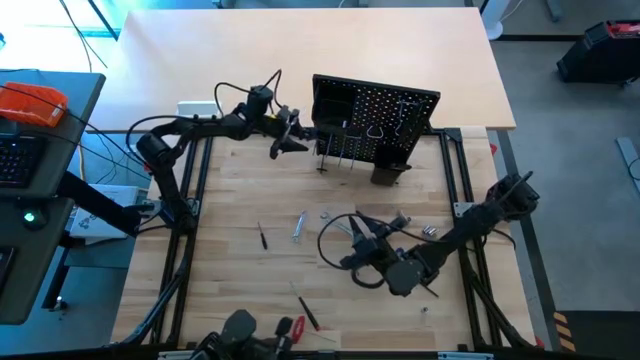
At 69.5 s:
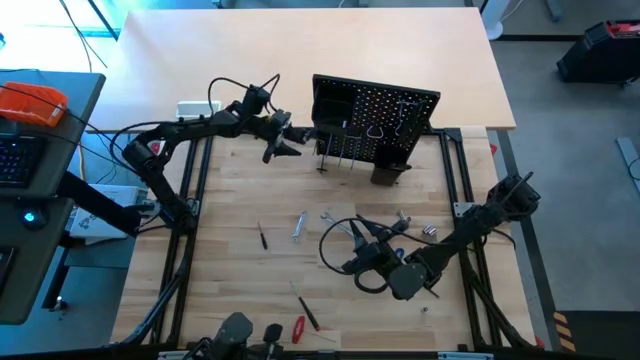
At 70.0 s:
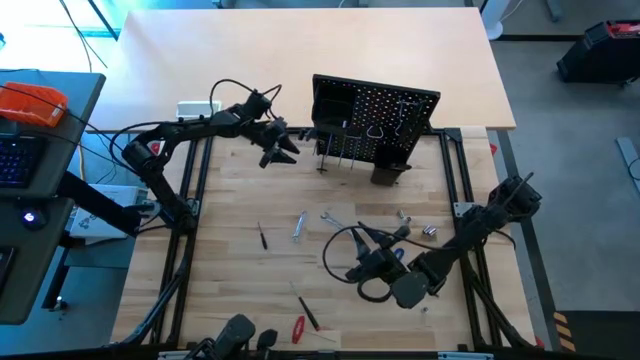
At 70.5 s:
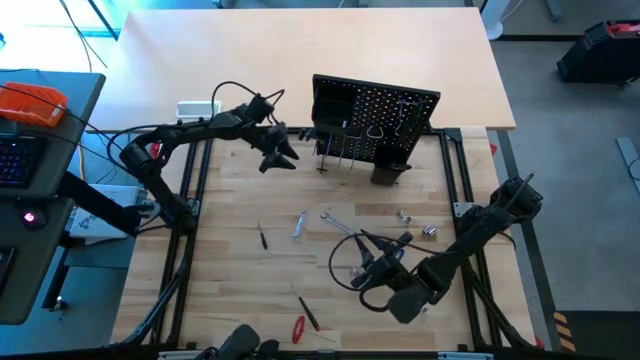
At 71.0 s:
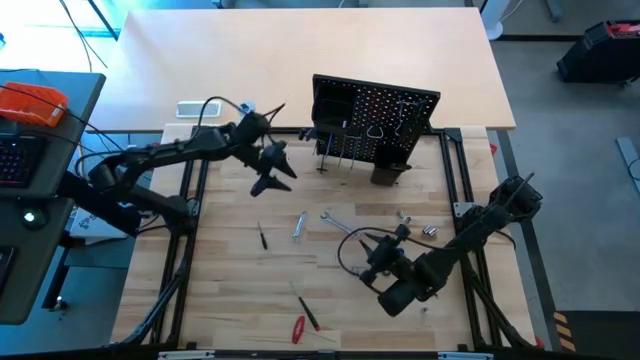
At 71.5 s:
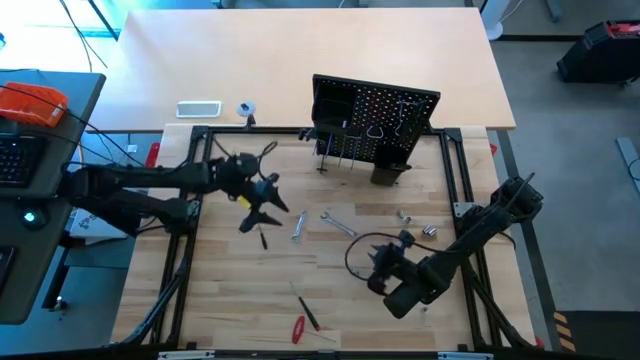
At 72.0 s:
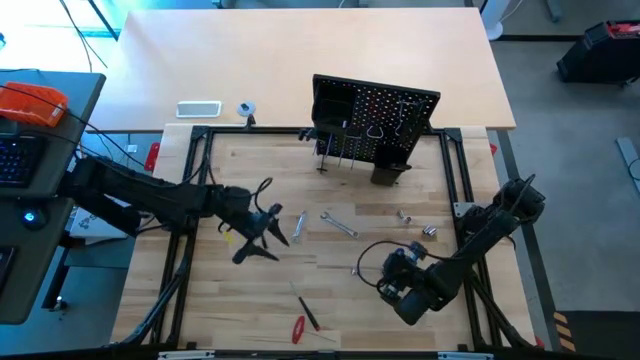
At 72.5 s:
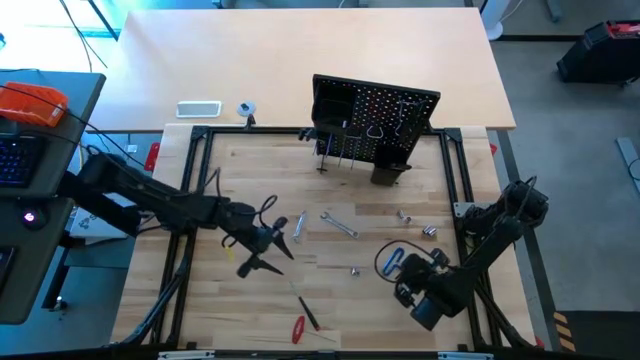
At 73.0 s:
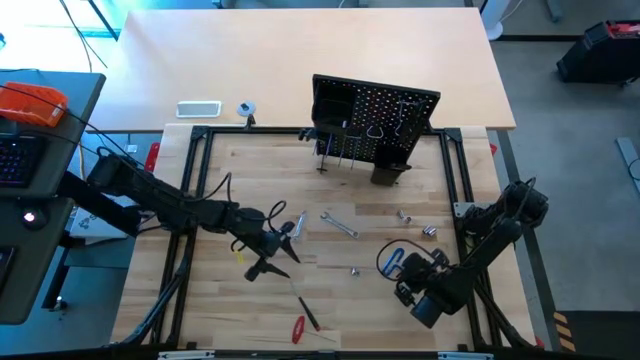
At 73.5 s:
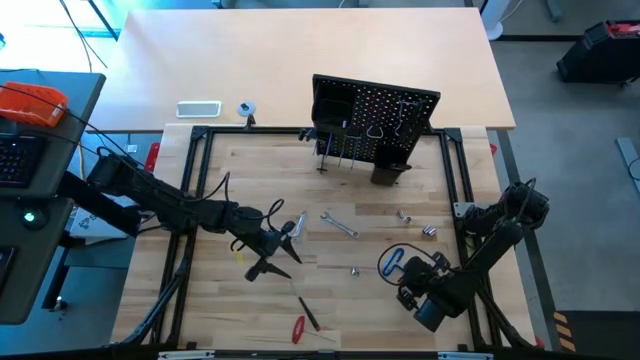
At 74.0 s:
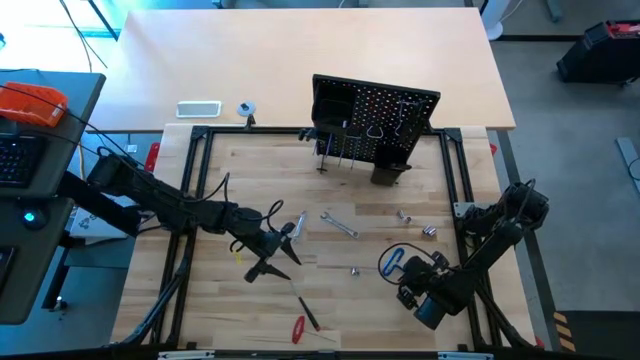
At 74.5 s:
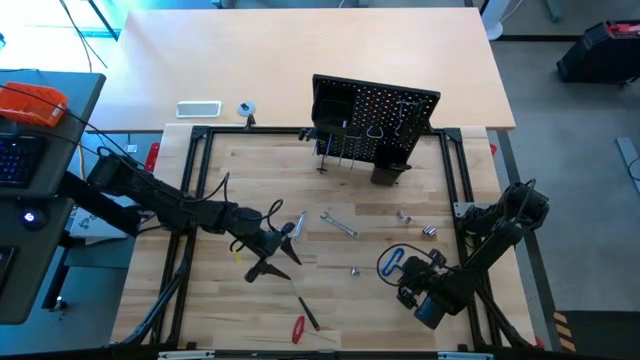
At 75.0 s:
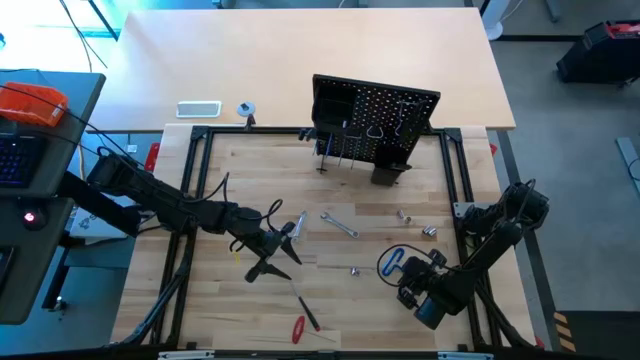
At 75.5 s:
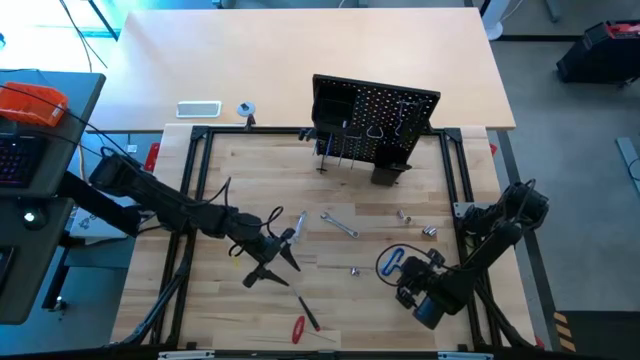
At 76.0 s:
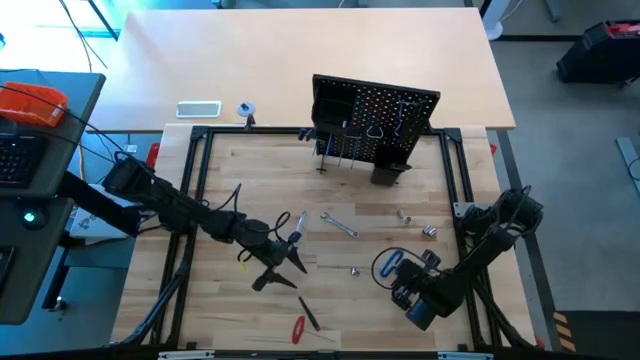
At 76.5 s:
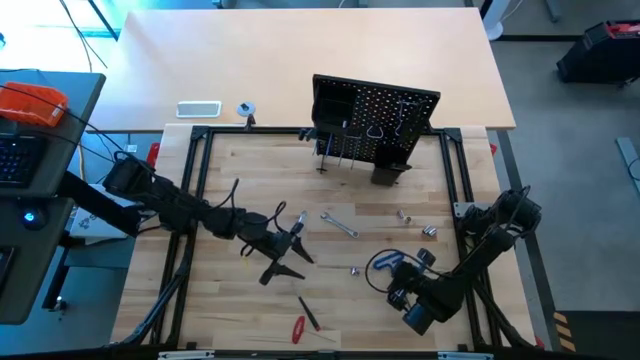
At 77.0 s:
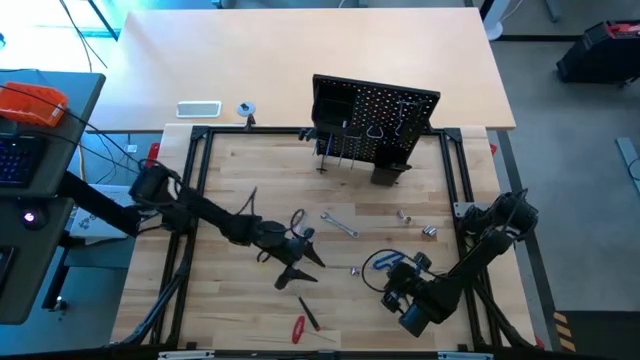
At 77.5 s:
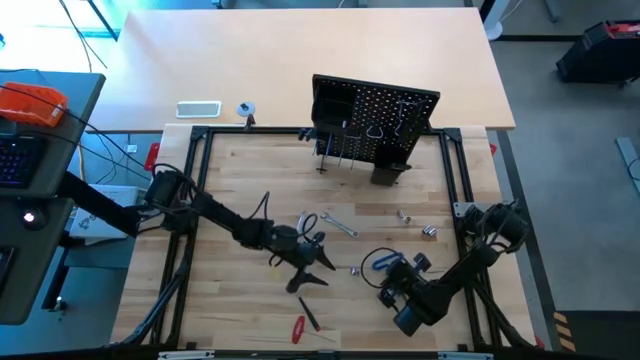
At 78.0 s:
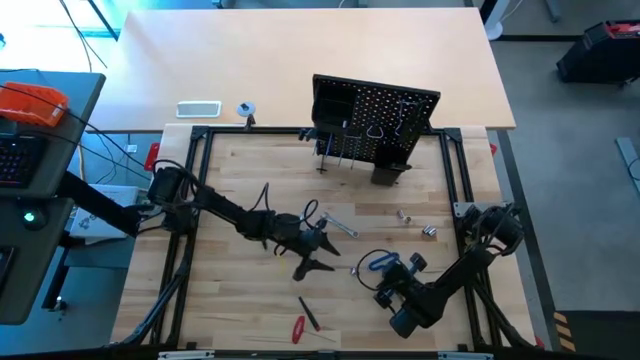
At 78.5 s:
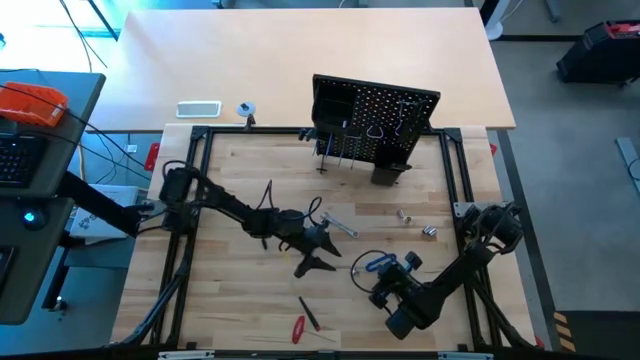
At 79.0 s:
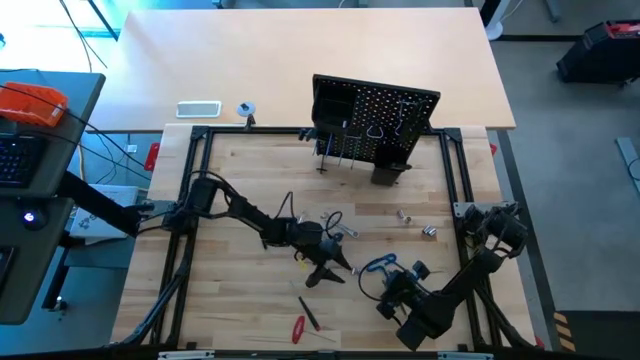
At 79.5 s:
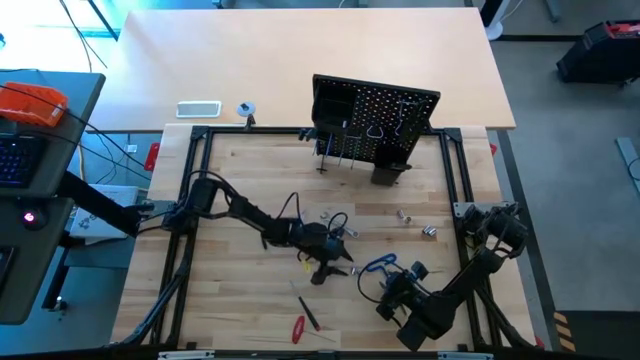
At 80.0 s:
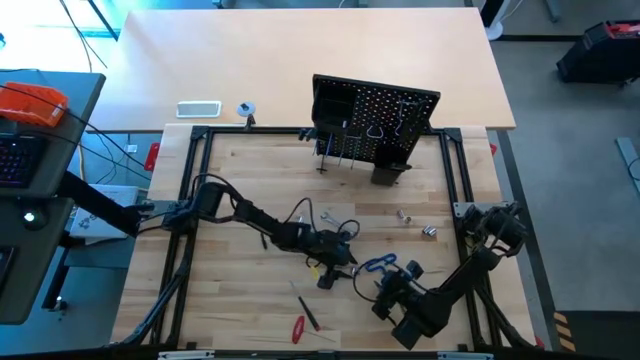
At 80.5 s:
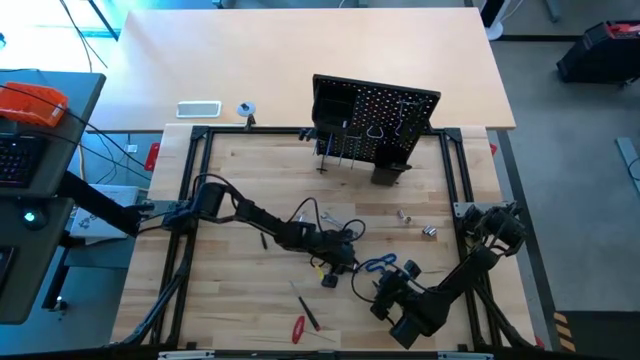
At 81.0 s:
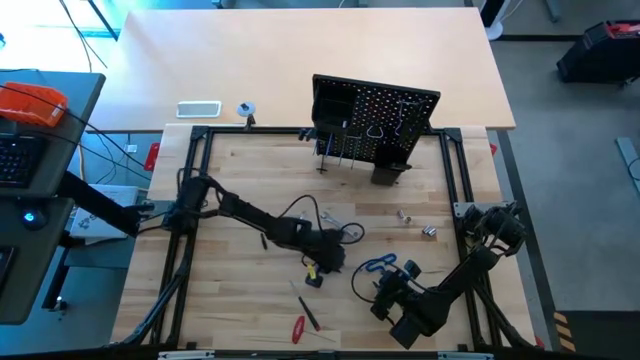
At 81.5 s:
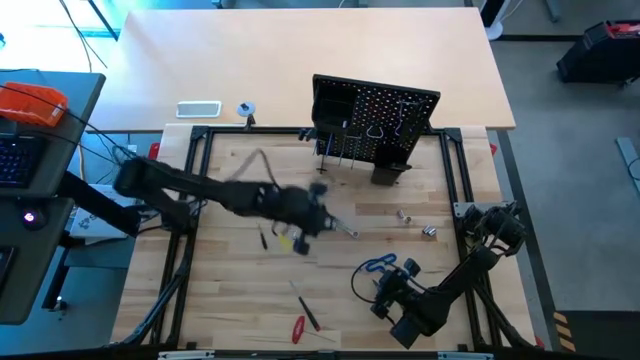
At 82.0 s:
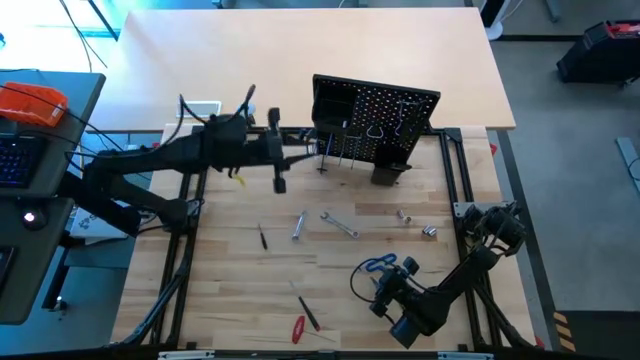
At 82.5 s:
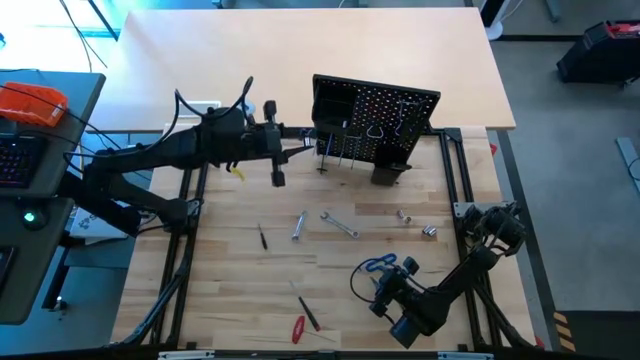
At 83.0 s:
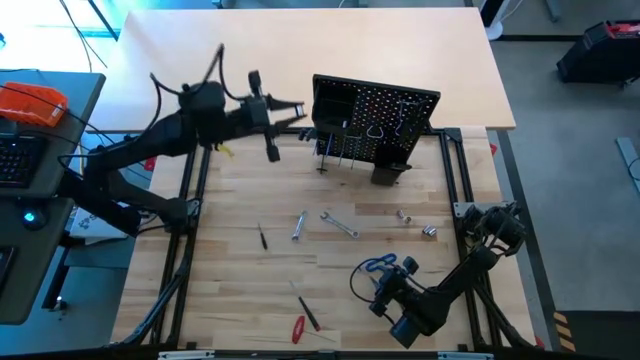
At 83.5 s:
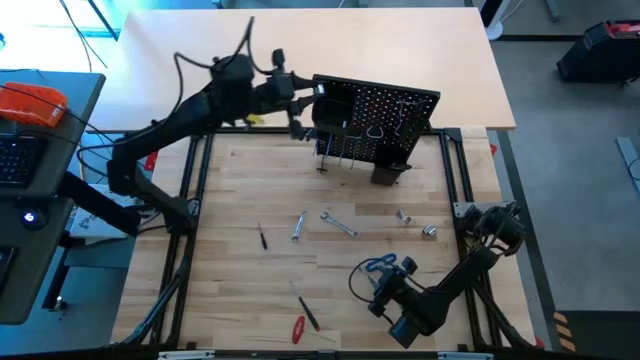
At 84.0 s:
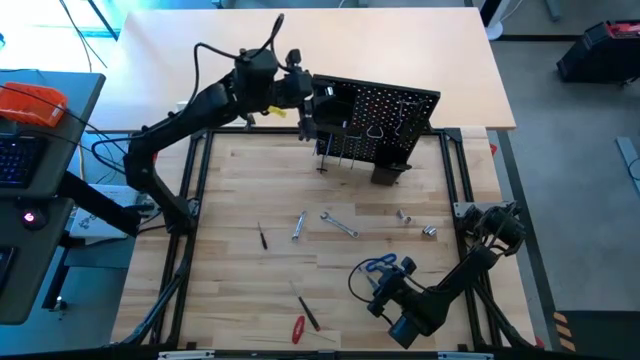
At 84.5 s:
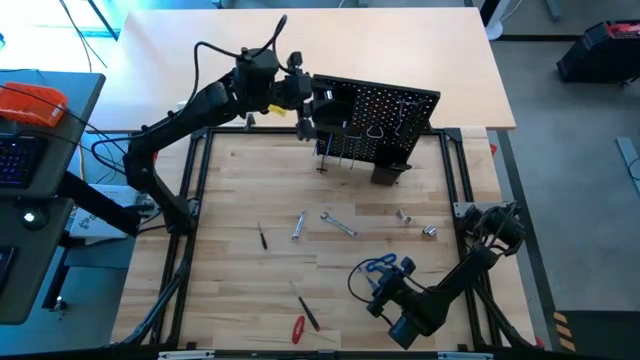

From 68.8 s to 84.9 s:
Task: Hang tools onto peg board
Hang the silver socket onto the pegboard

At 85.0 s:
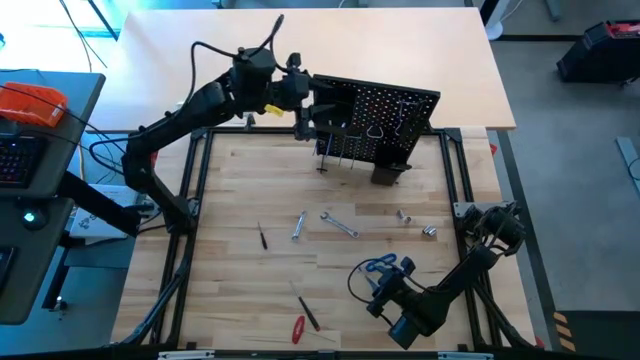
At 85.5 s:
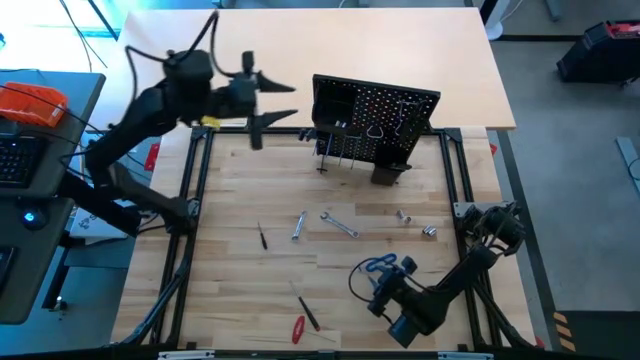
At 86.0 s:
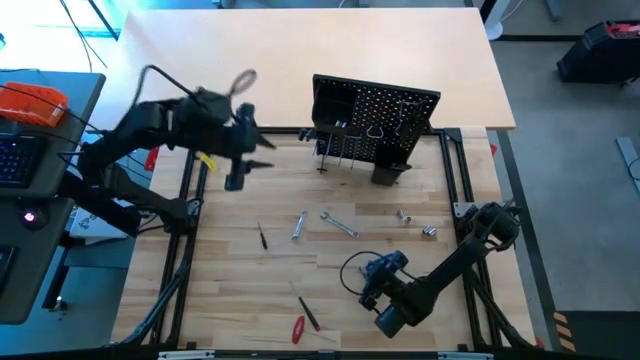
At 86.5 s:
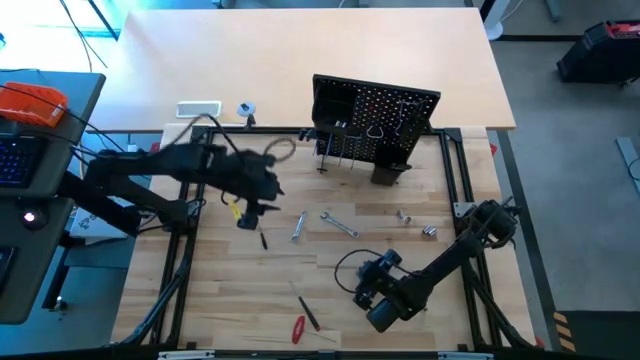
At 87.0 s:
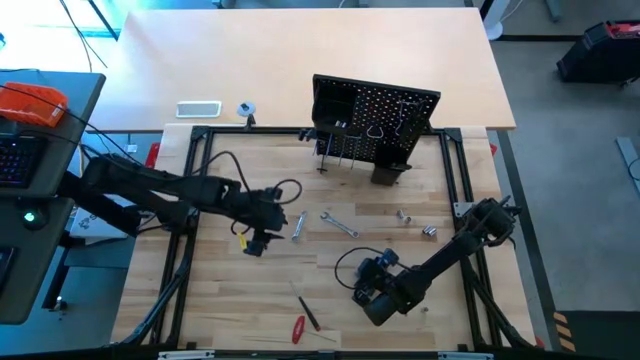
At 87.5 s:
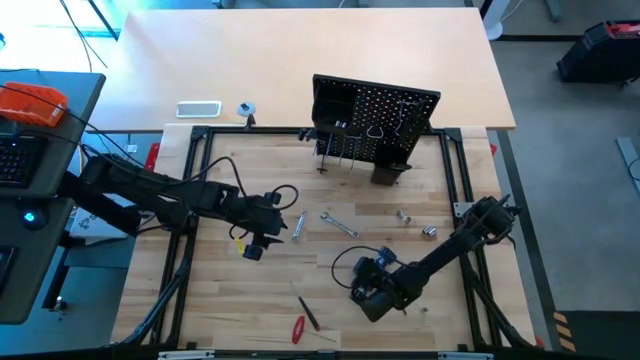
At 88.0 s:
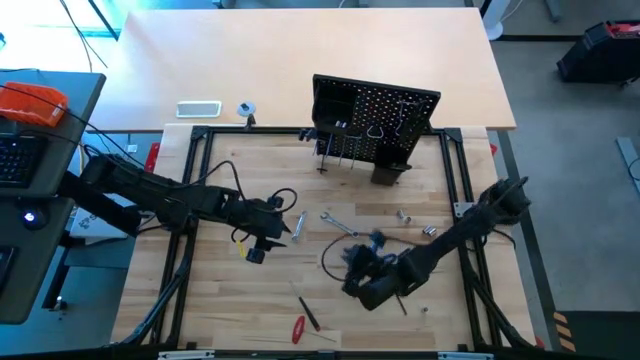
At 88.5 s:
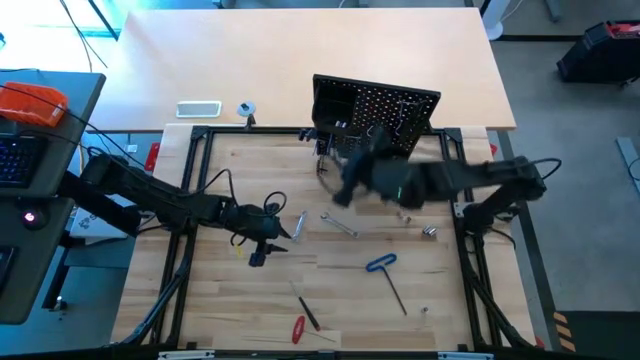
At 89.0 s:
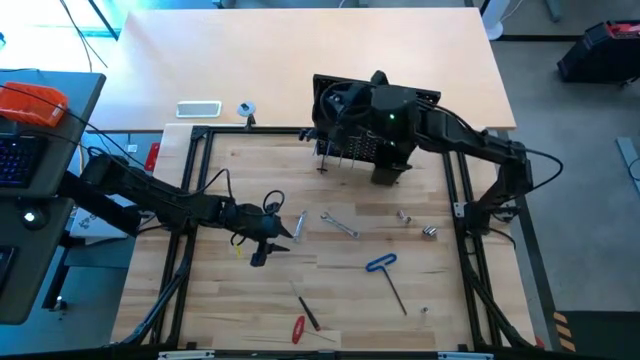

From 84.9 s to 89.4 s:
Hang the silver socket onto the pegboard

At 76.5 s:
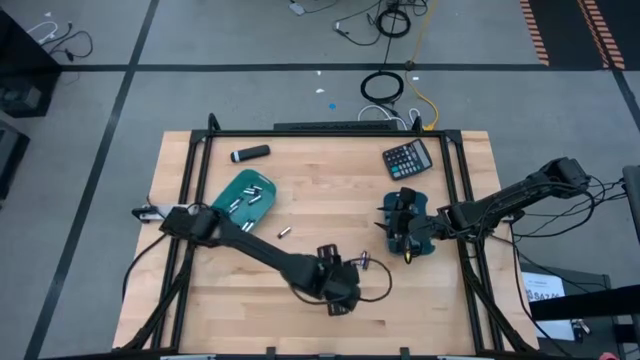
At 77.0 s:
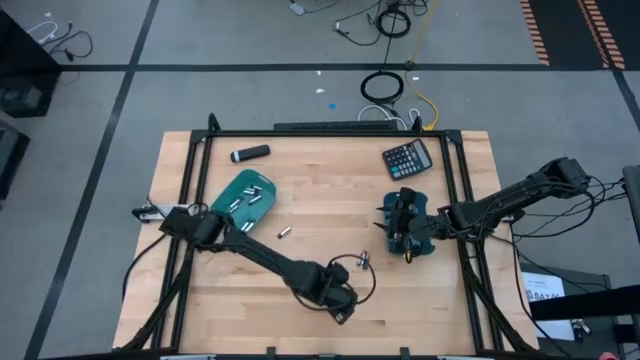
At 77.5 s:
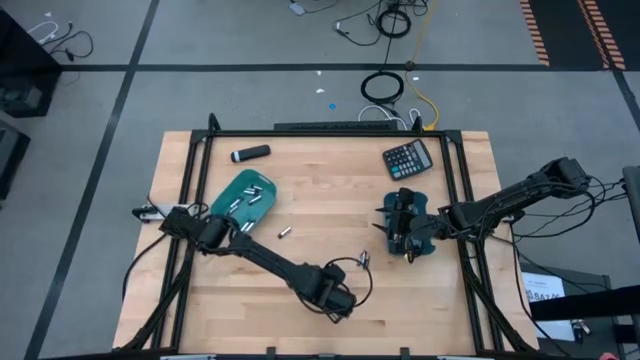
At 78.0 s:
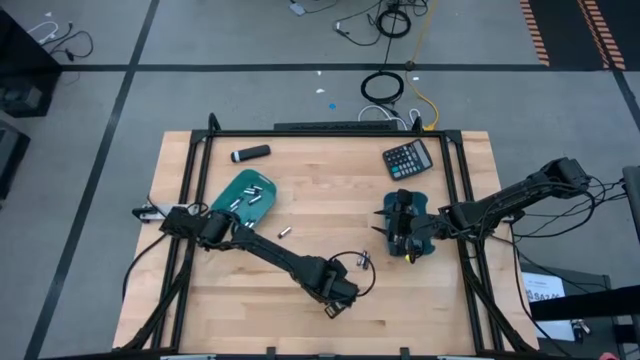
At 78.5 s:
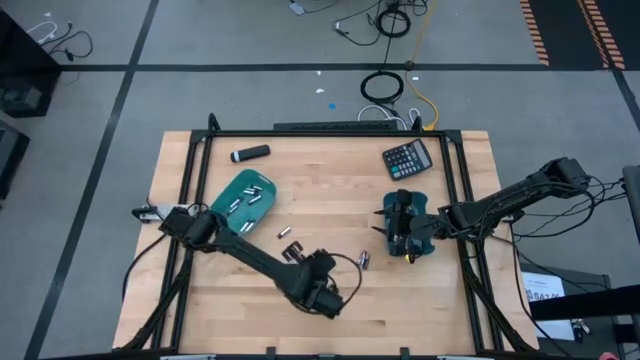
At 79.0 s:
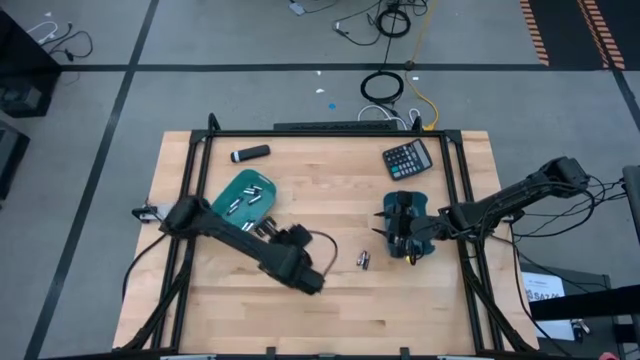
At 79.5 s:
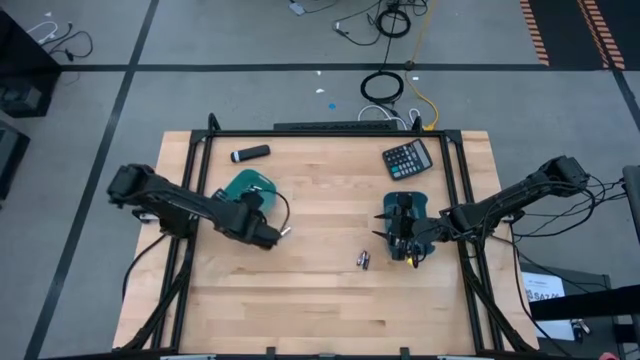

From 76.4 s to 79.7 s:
Task: Sort batteries
Put the silver battery into the green bin
